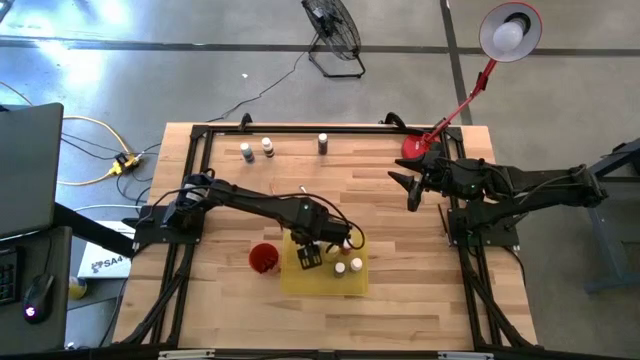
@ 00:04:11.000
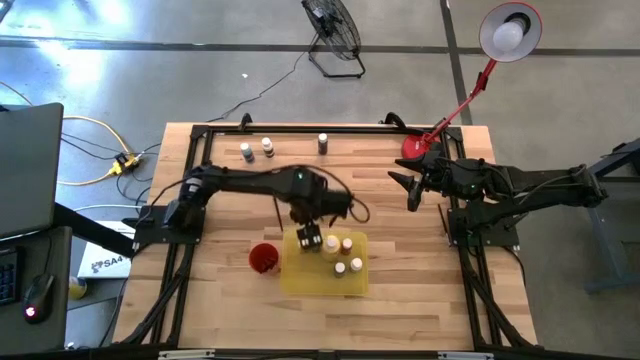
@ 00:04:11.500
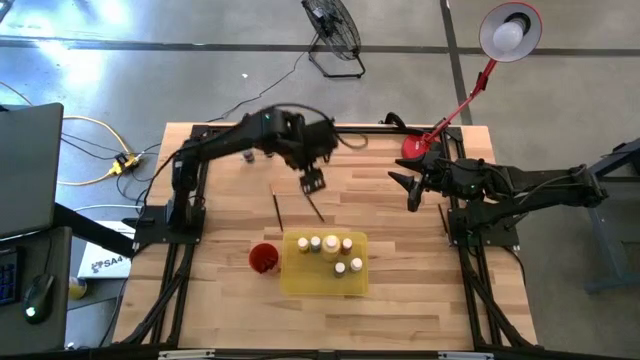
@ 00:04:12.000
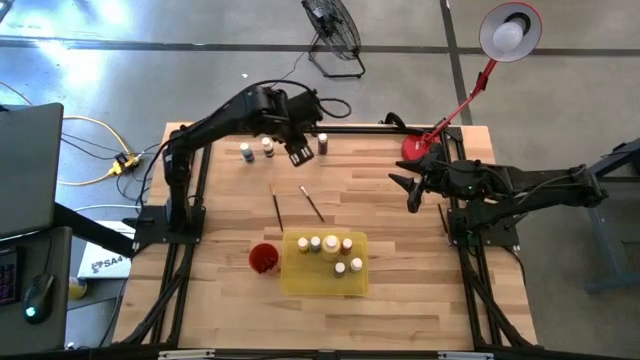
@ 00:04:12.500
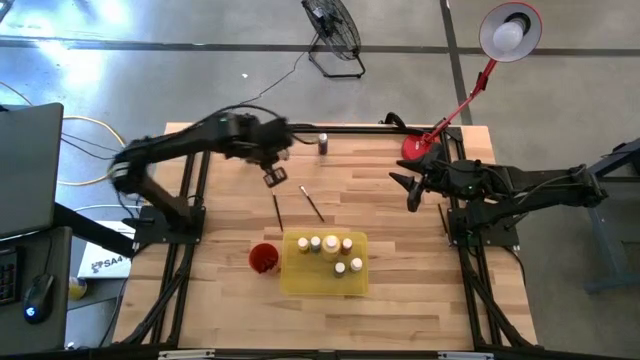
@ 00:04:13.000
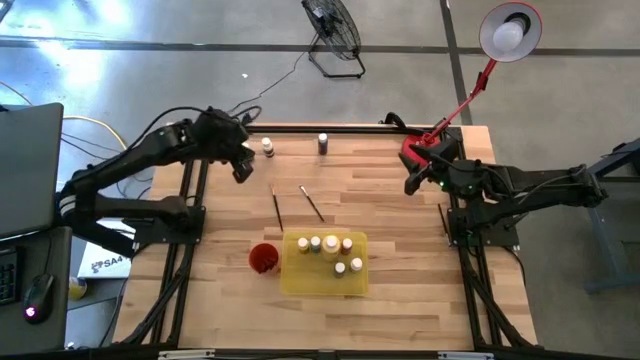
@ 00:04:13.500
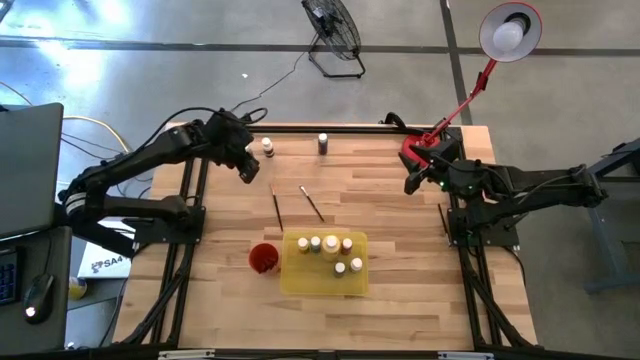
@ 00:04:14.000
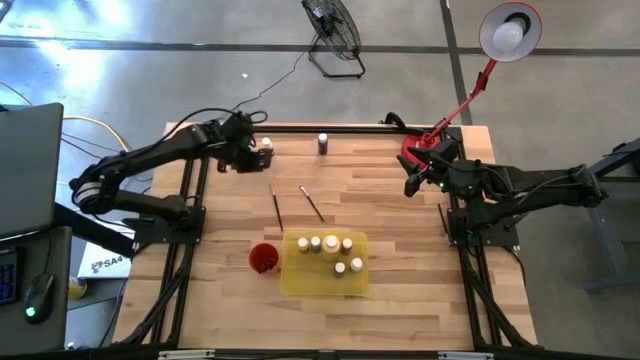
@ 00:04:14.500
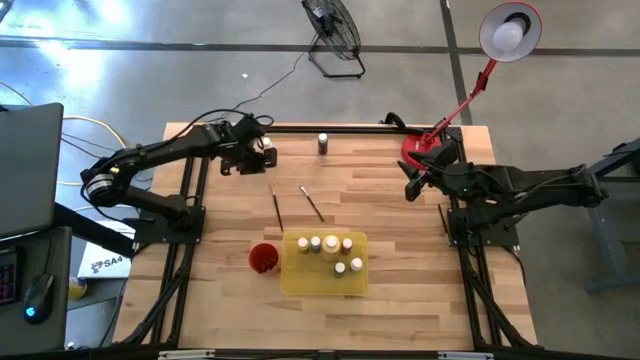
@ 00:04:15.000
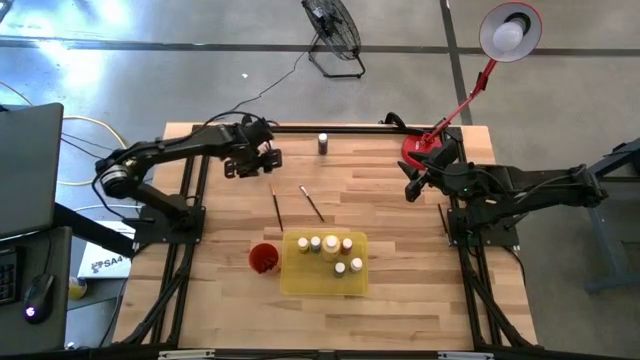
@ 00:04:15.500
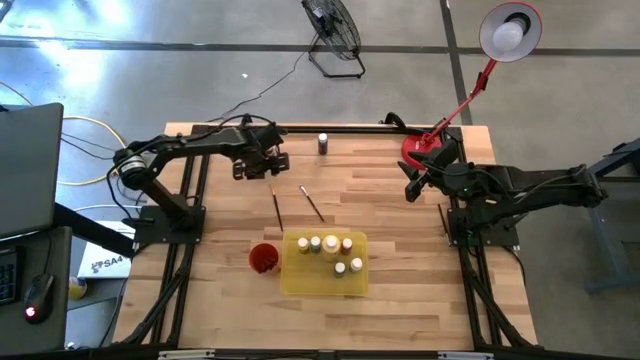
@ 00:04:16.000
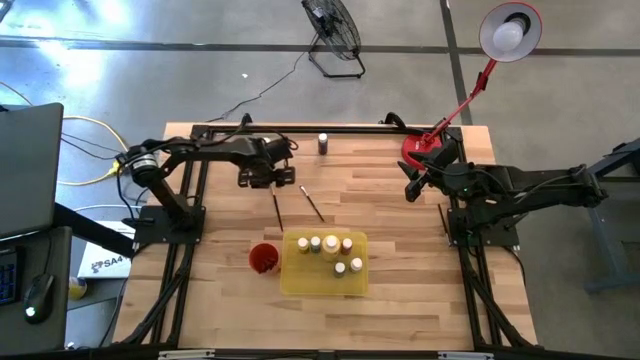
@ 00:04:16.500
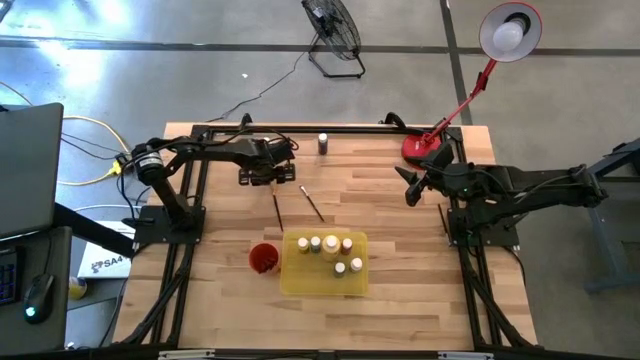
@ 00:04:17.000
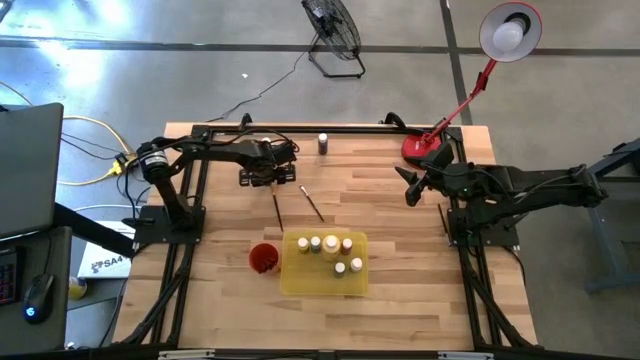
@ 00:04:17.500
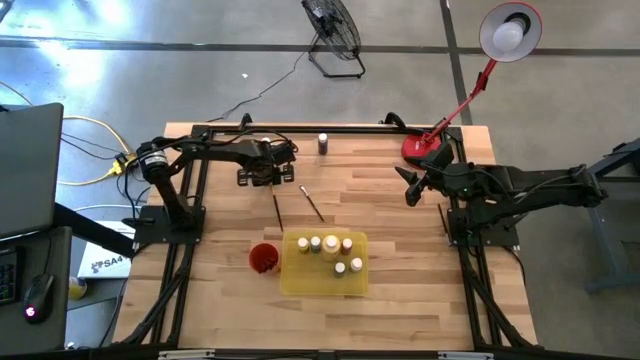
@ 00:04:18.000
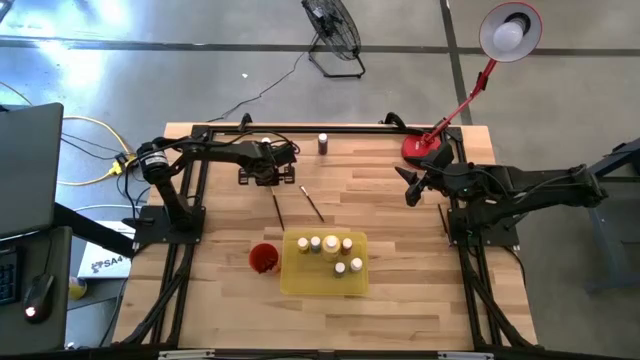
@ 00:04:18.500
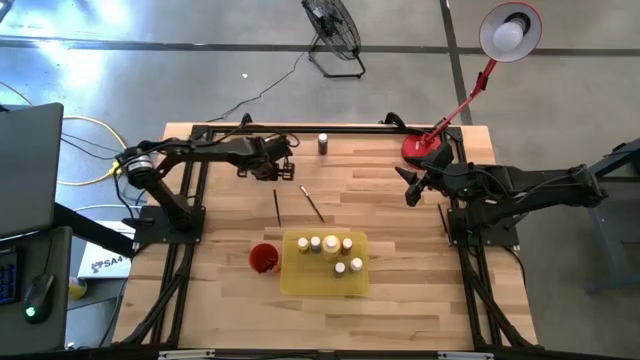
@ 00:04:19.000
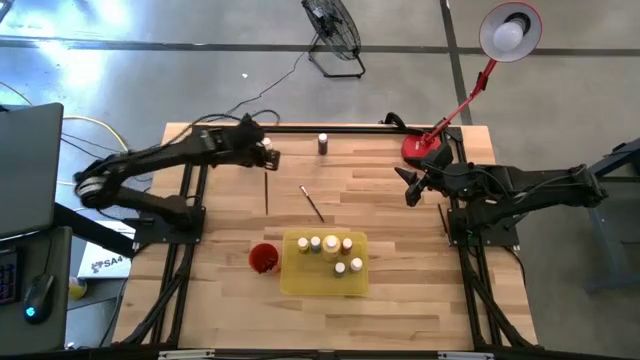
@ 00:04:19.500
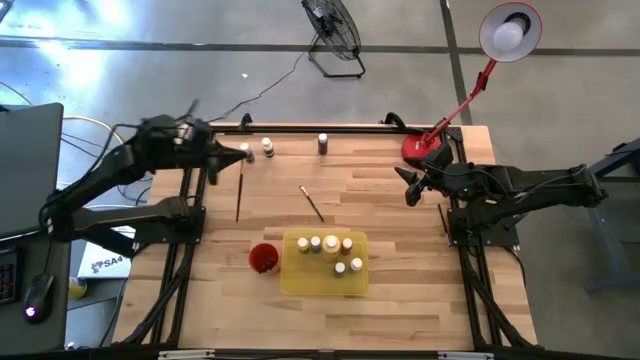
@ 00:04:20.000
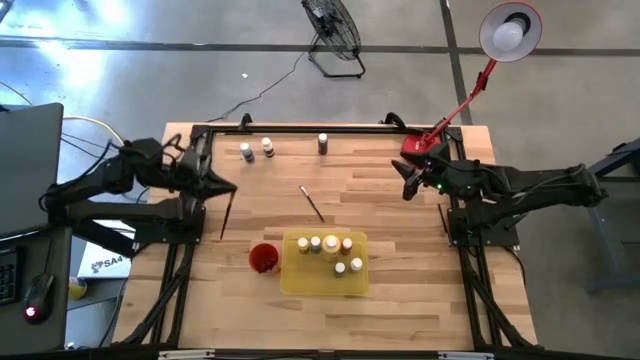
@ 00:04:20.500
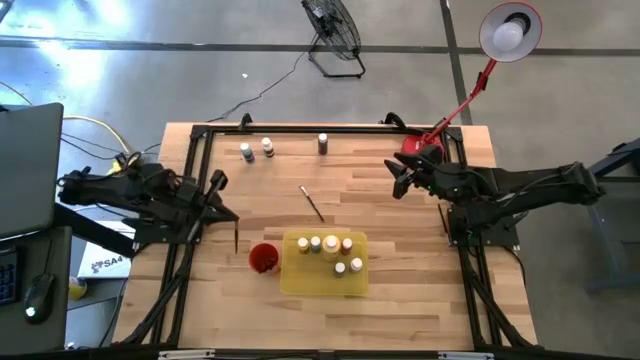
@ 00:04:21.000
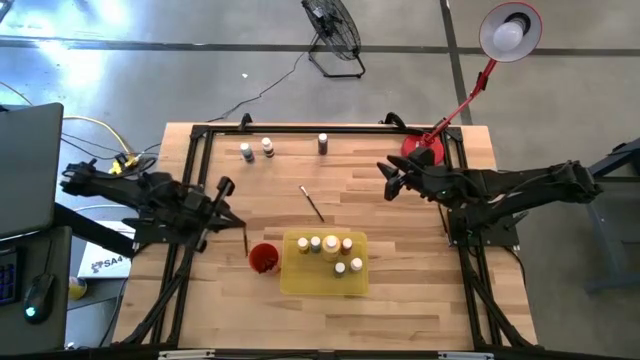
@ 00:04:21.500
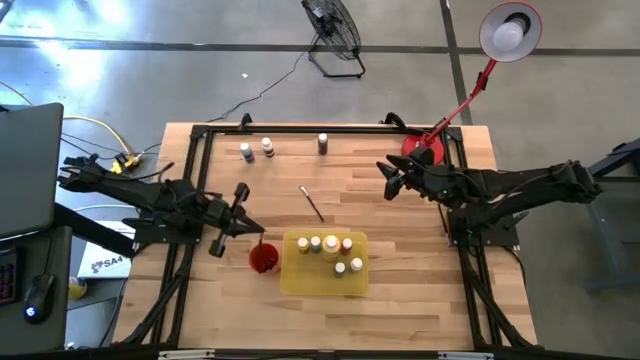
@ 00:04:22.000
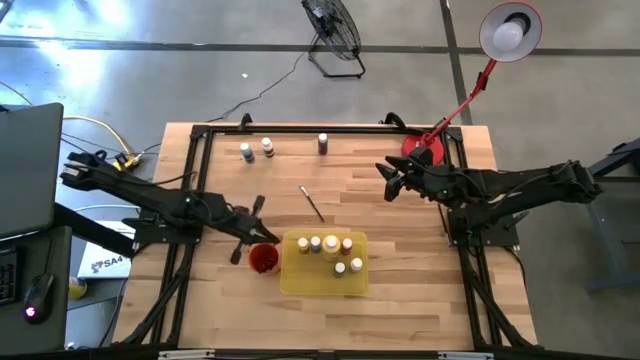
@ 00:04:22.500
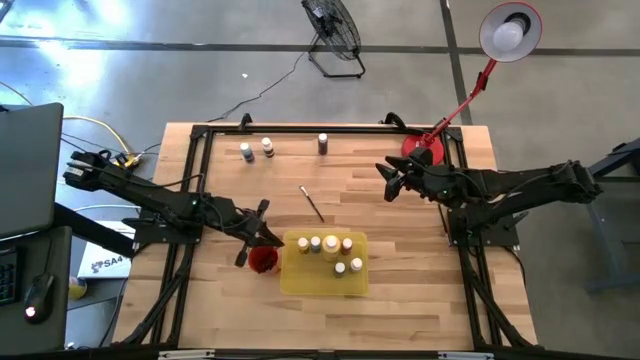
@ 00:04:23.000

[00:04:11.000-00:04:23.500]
Task: Pick & Place Paint Supplies
Put the golden paintbrush into the orange cup

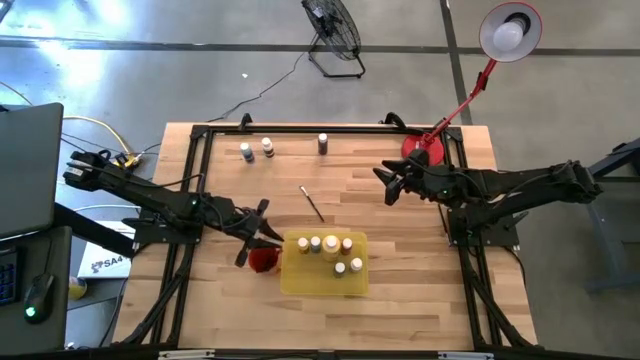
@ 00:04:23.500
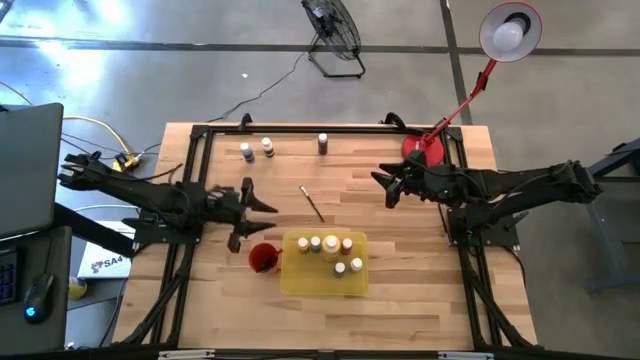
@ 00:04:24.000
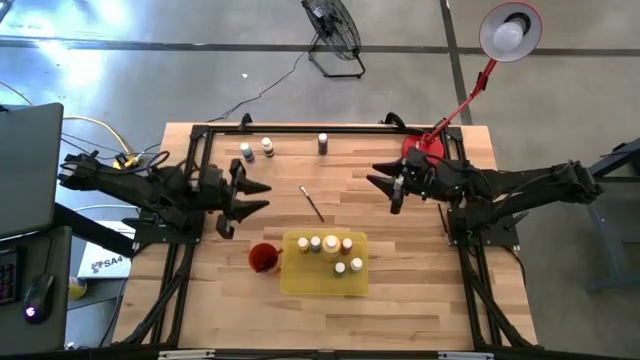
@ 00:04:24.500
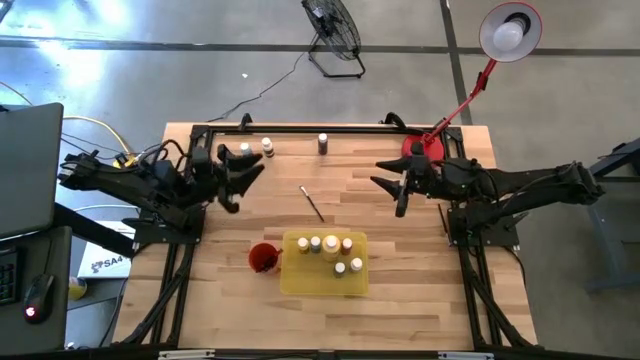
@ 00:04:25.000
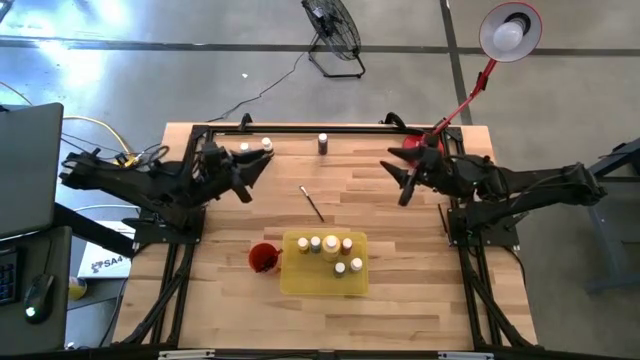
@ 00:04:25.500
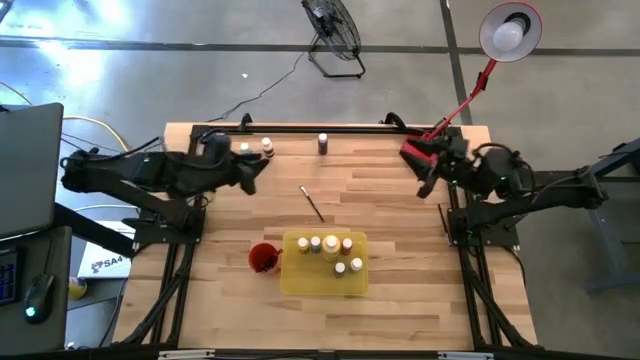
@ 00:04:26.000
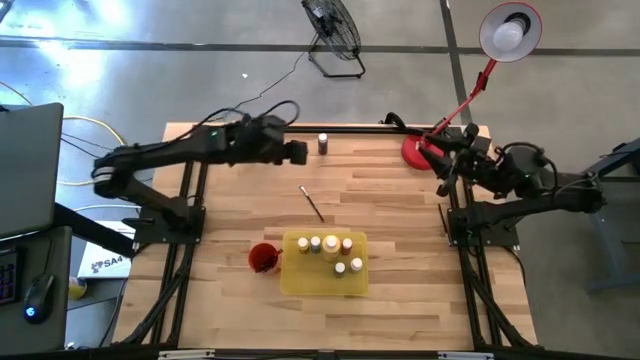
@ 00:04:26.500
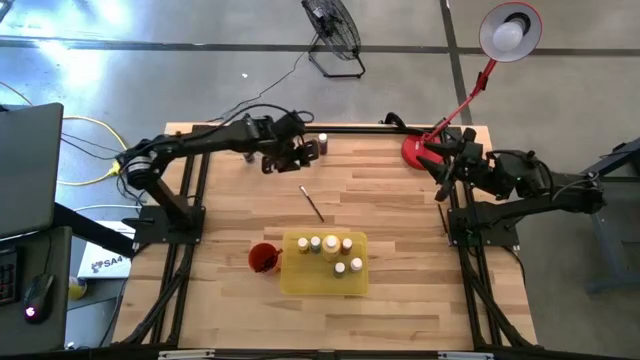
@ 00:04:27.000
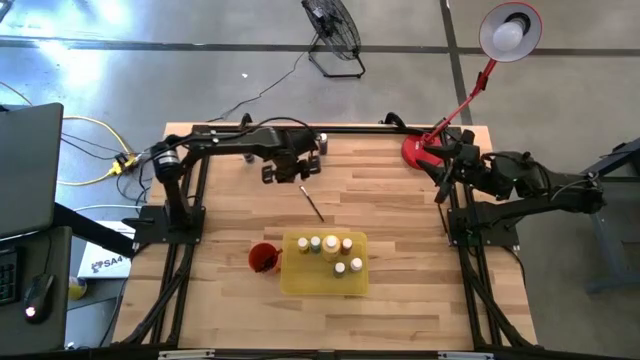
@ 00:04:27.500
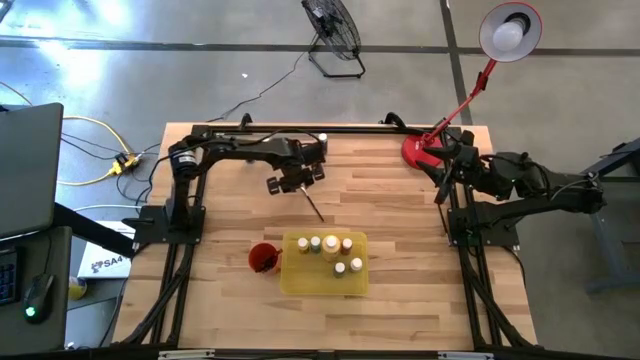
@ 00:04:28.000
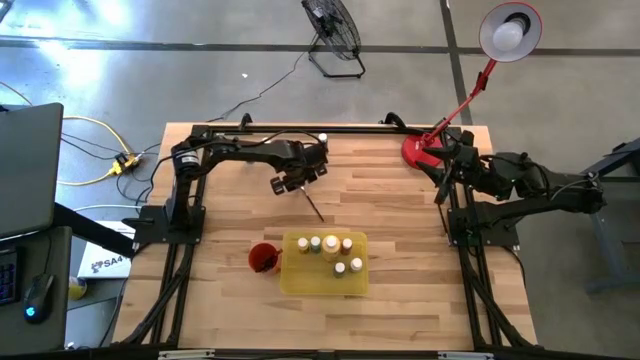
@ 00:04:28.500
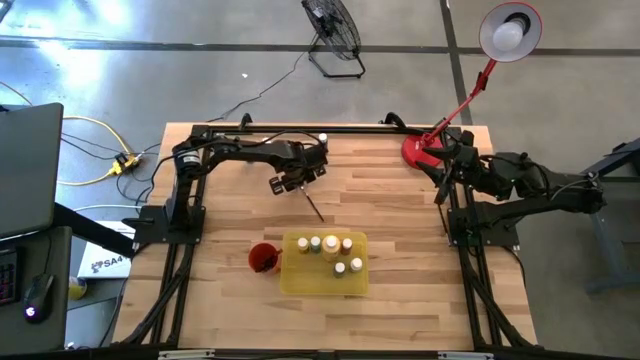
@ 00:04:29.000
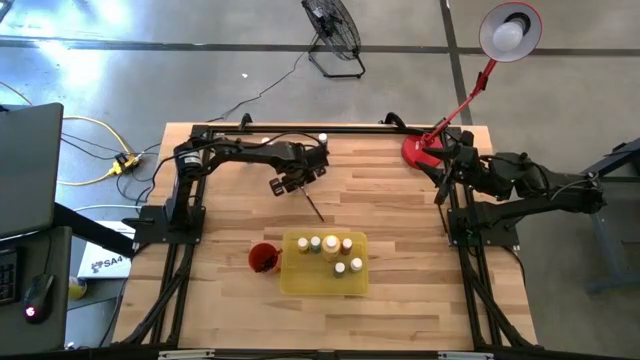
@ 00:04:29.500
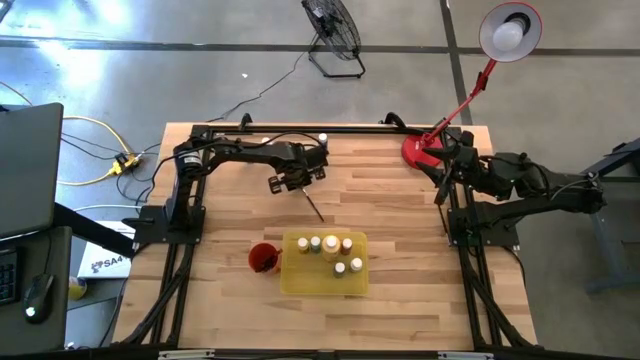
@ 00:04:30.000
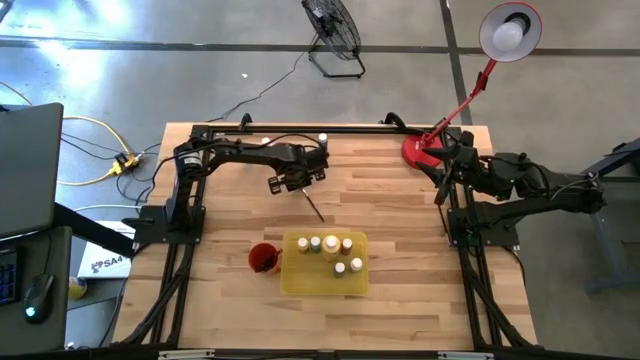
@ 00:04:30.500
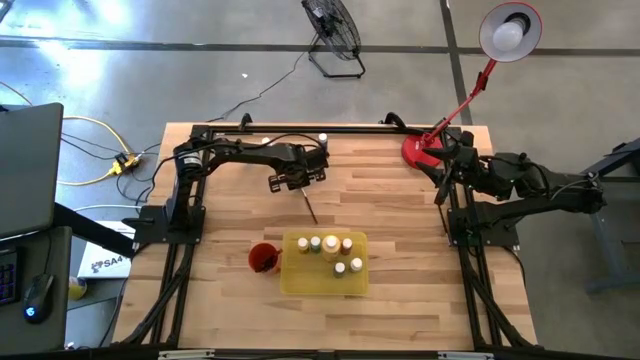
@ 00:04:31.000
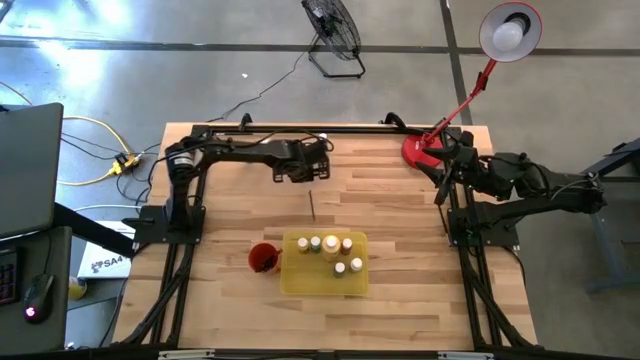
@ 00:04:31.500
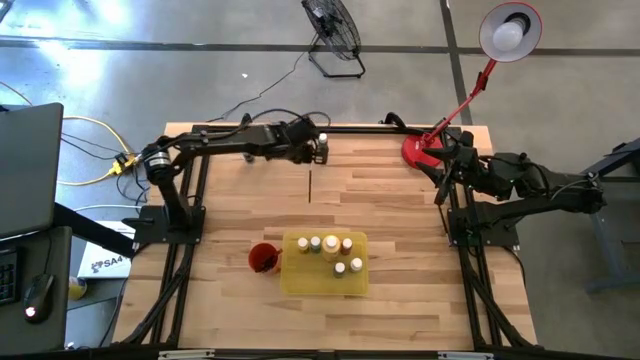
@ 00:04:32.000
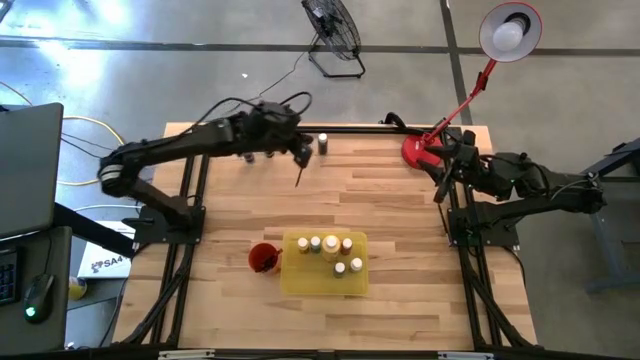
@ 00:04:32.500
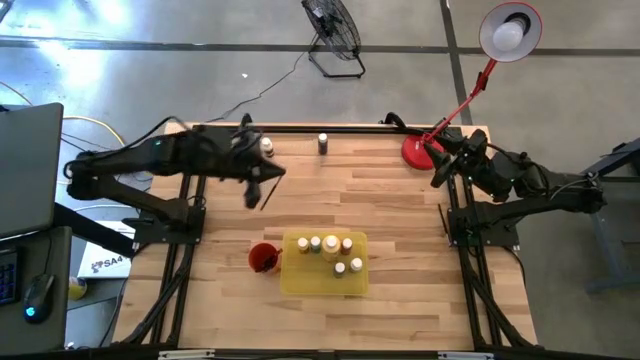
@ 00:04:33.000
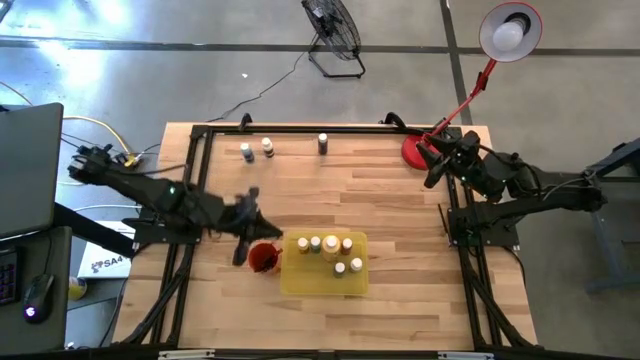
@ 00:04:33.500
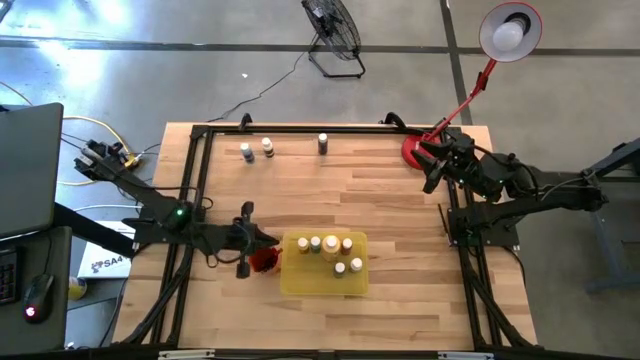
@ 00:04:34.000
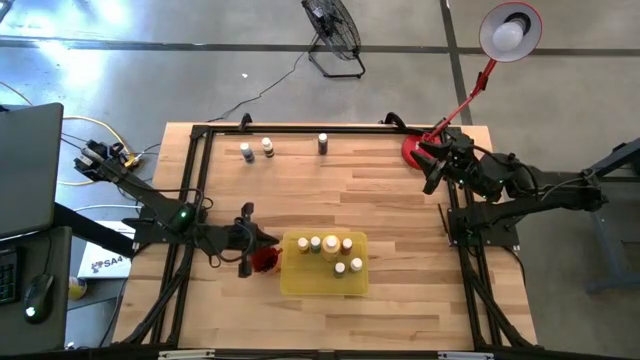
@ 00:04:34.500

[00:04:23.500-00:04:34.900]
Put the silver paintbrush into the orange cup
